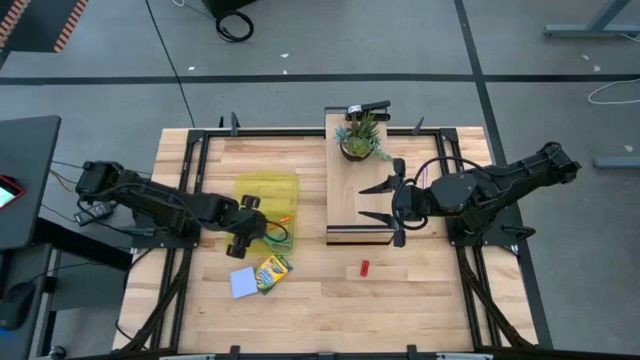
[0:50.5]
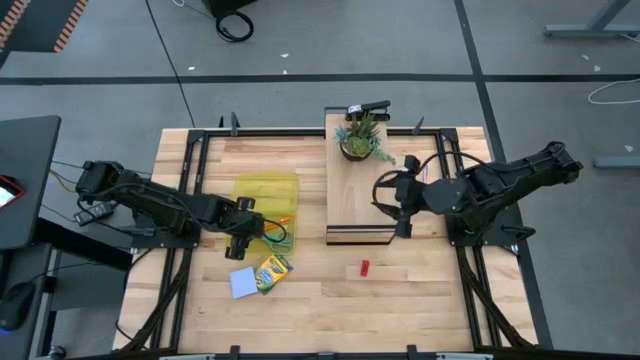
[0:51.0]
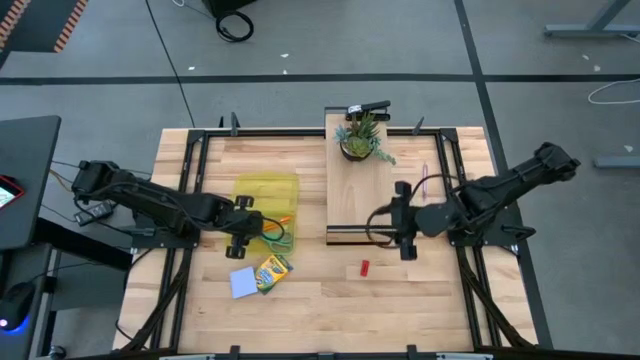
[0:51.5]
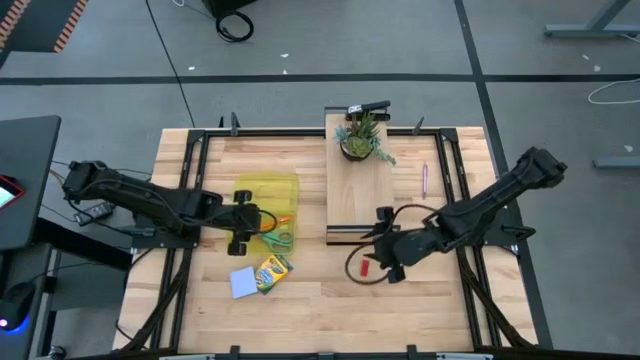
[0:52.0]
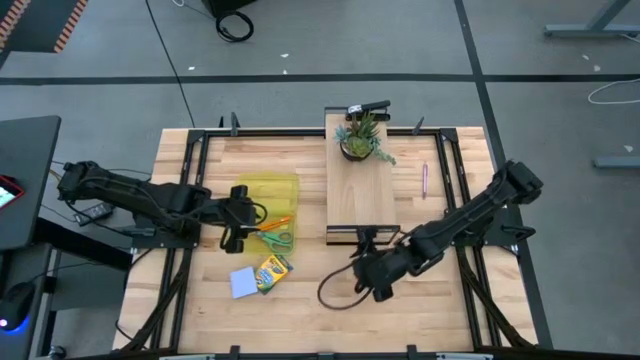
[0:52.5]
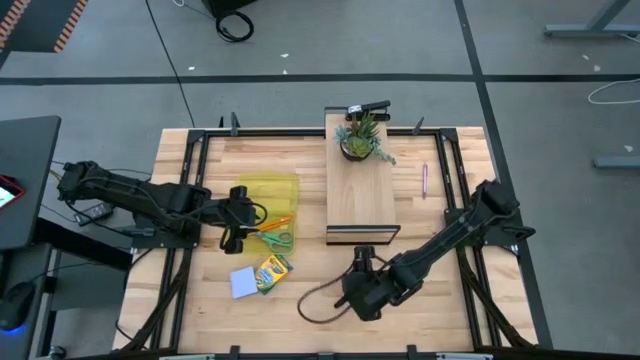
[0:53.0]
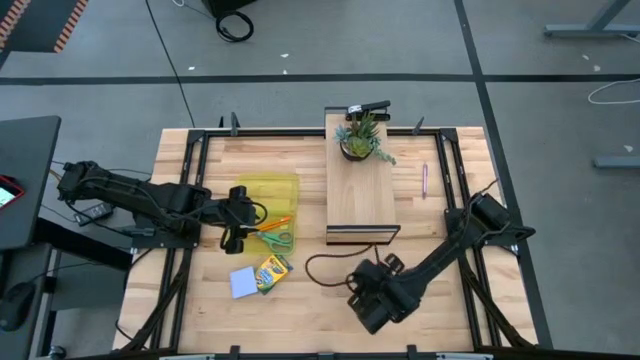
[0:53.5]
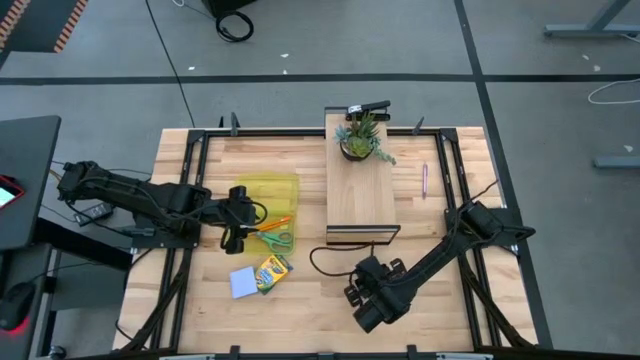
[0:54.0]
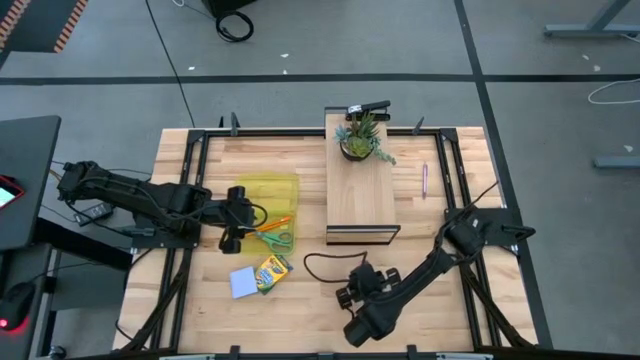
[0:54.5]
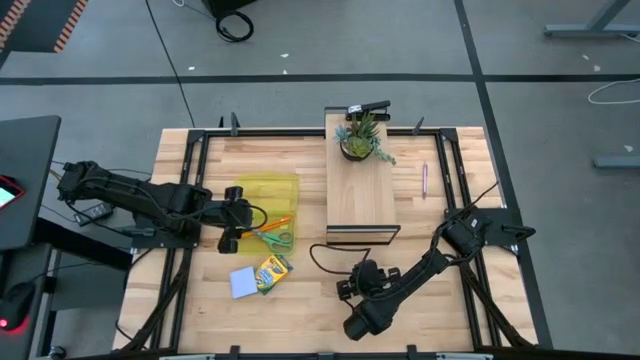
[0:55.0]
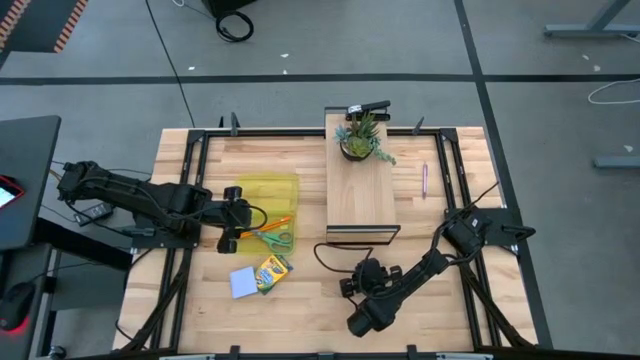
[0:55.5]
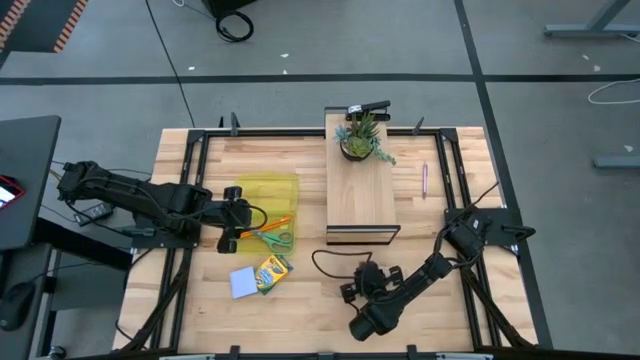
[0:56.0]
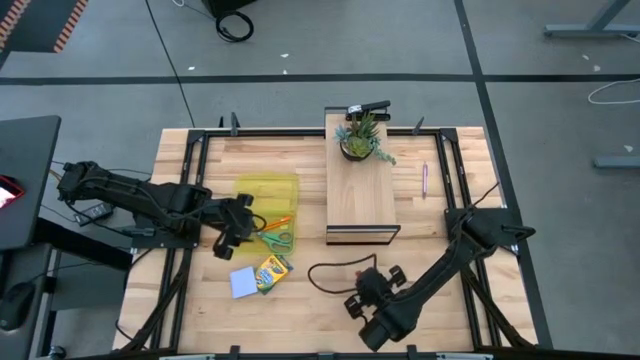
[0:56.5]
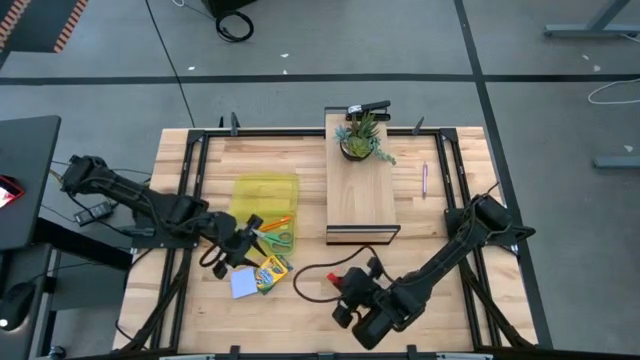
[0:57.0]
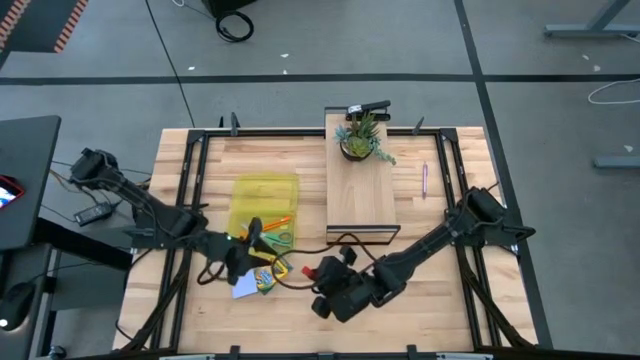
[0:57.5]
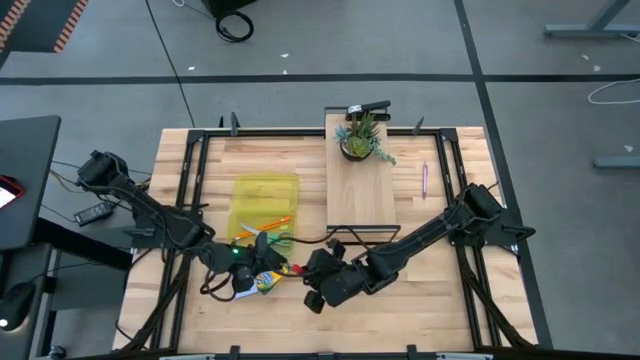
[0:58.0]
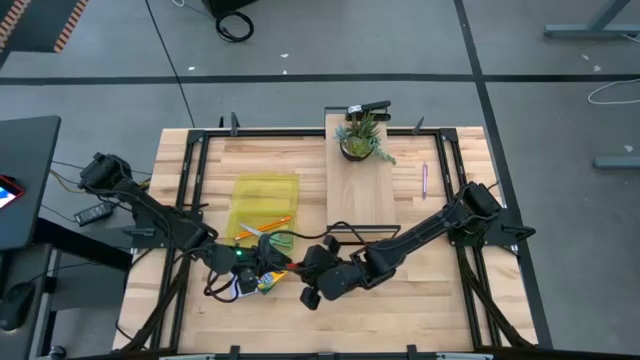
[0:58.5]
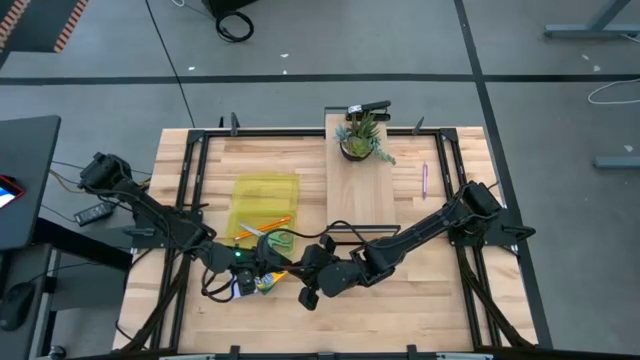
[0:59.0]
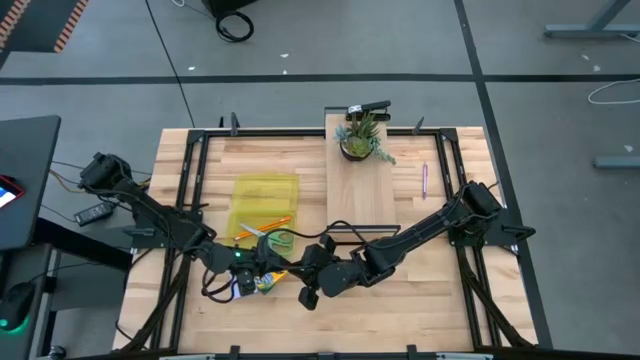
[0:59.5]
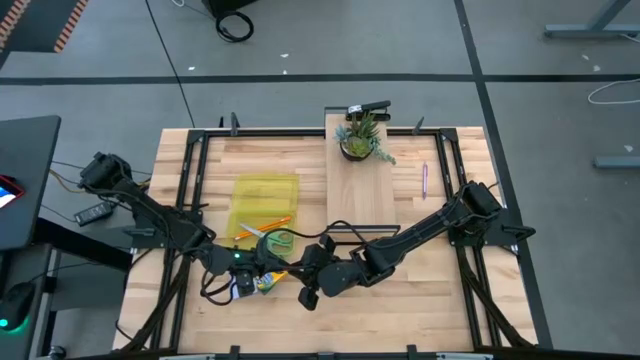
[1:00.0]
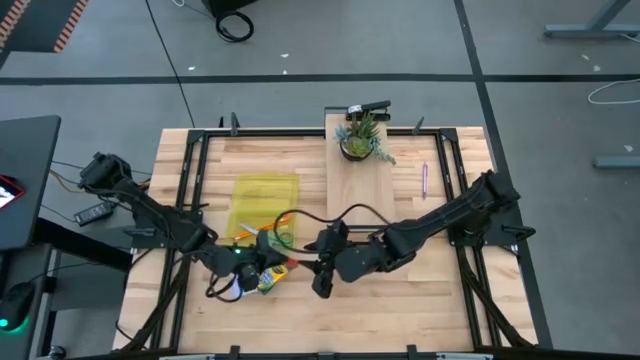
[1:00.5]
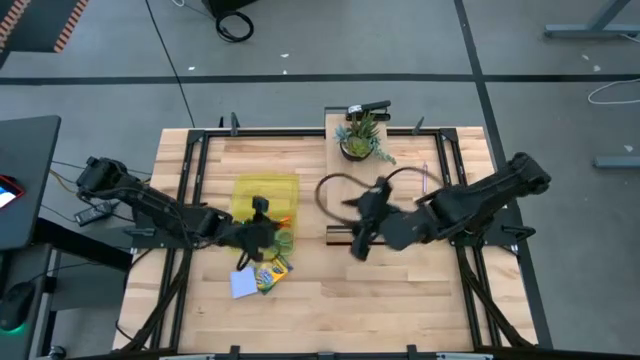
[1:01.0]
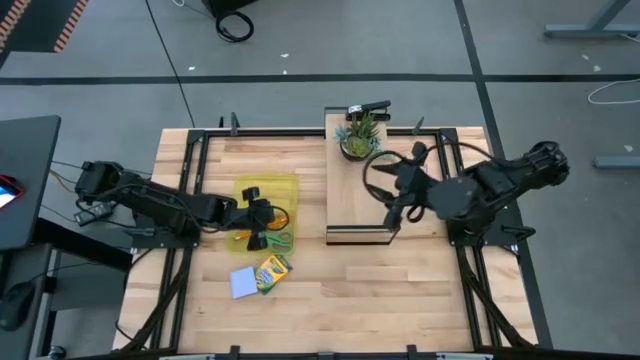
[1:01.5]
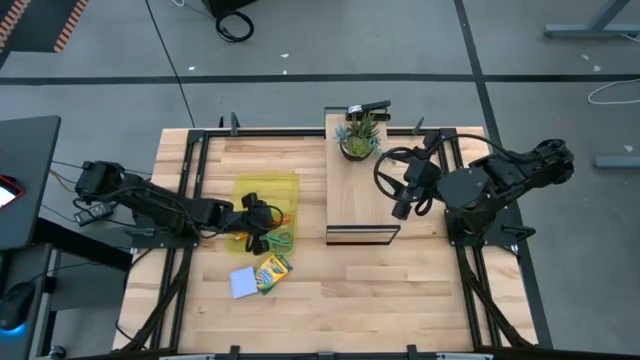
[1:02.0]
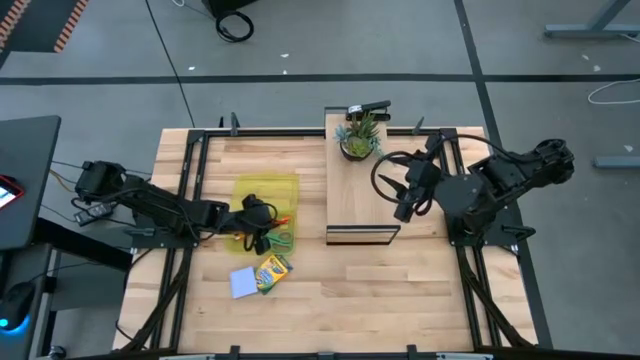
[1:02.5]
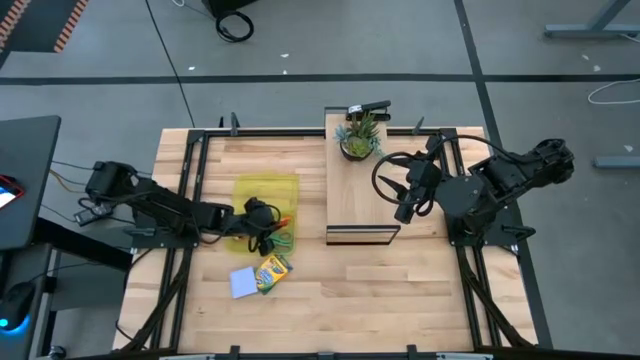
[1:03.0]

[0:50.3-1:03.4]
Task: Pack school essentials
Put the red eraser into the yellow supply box

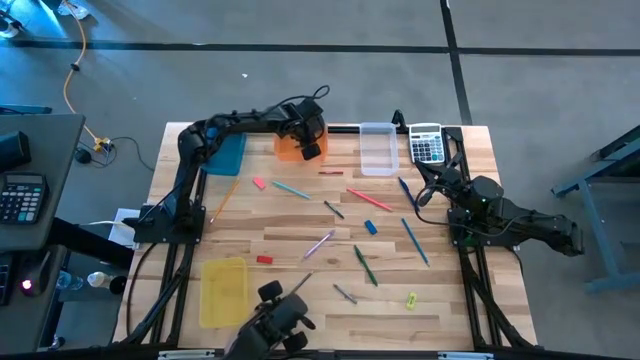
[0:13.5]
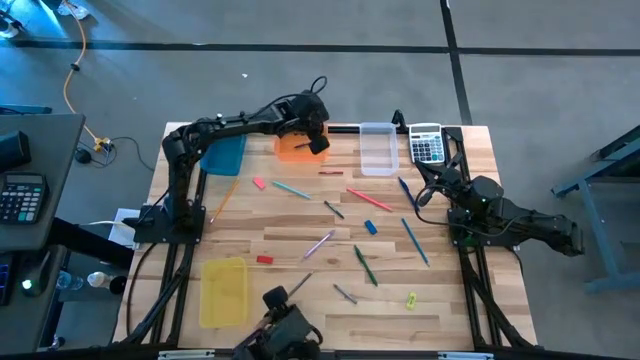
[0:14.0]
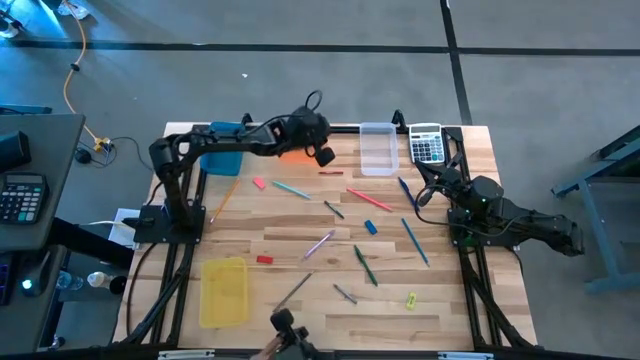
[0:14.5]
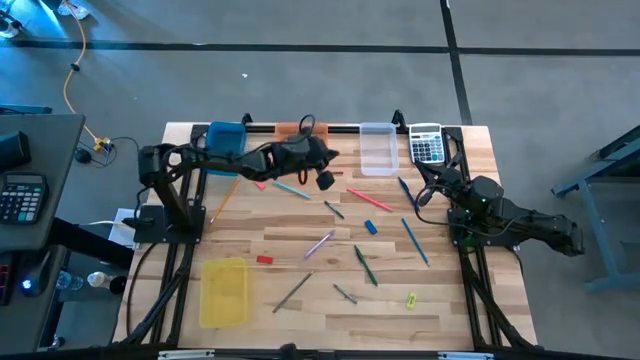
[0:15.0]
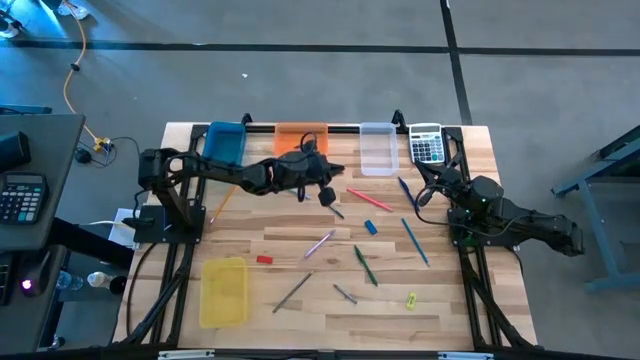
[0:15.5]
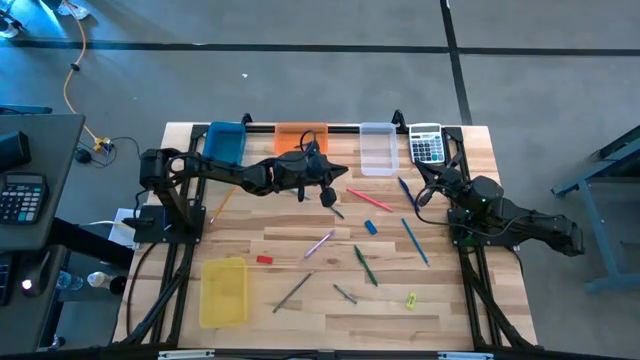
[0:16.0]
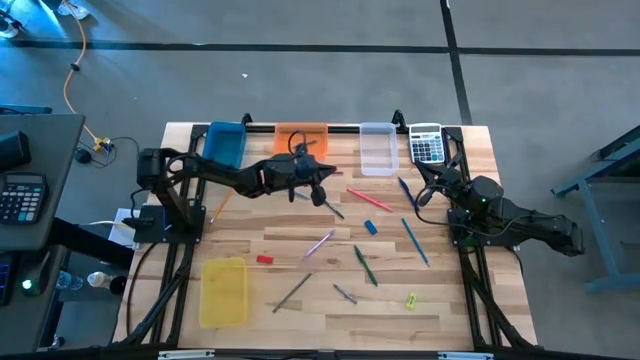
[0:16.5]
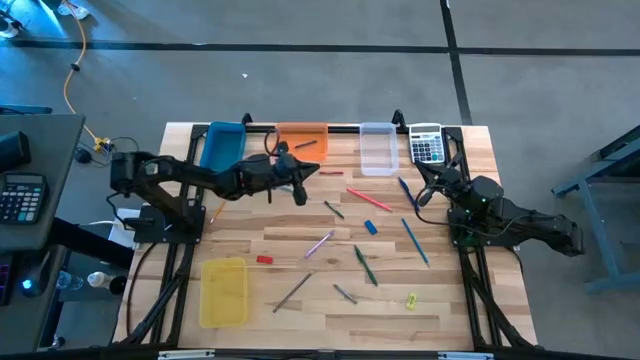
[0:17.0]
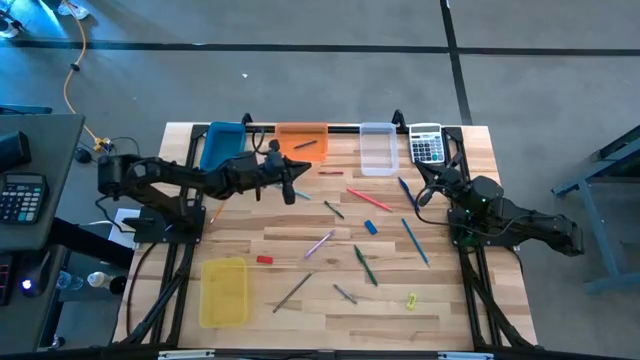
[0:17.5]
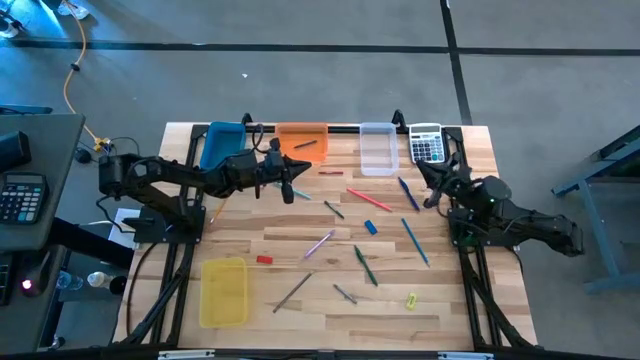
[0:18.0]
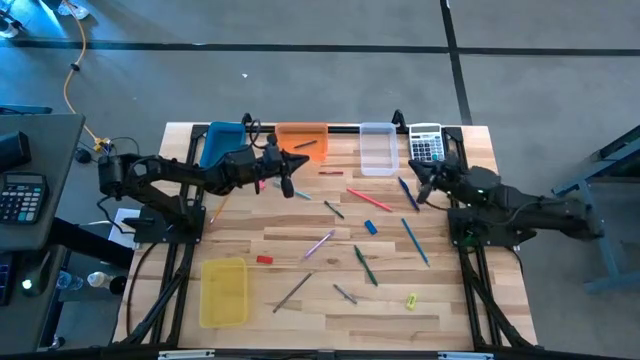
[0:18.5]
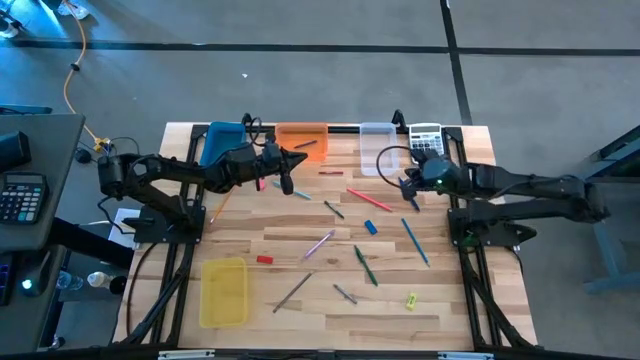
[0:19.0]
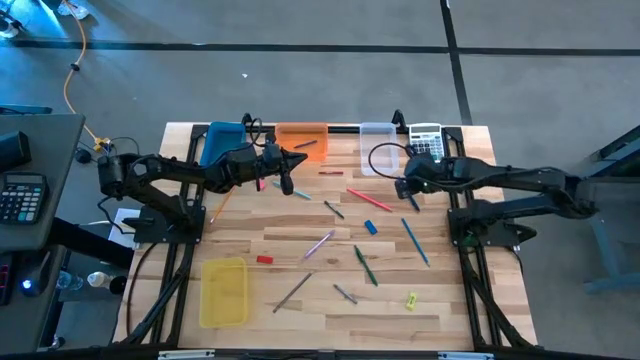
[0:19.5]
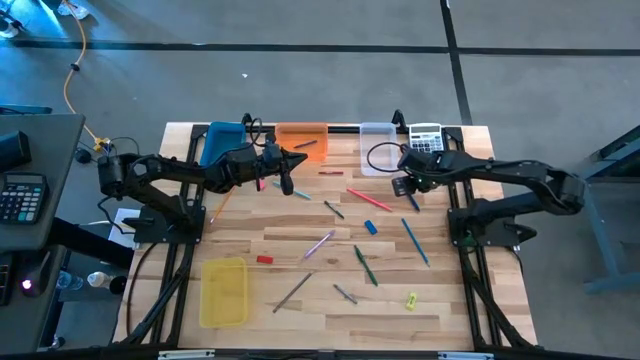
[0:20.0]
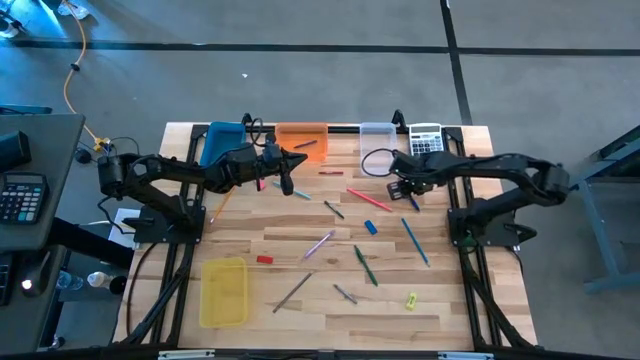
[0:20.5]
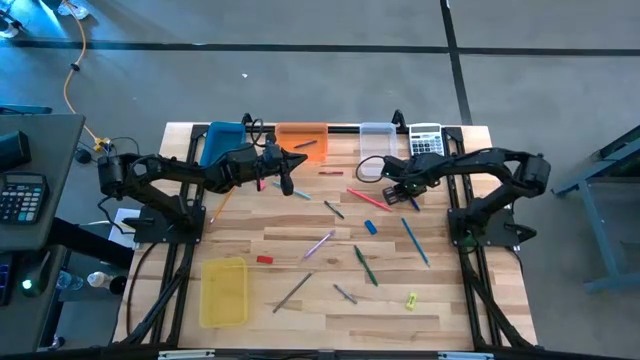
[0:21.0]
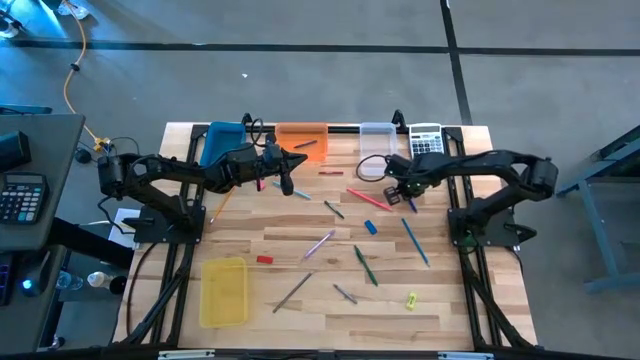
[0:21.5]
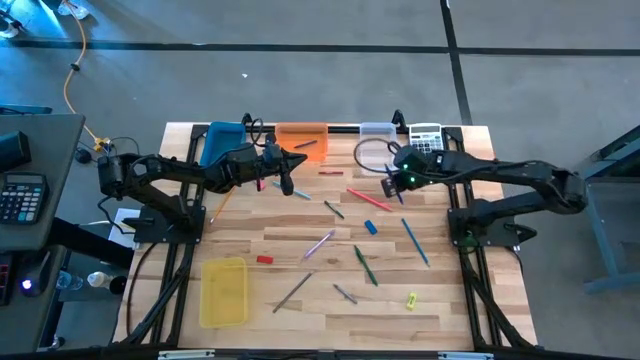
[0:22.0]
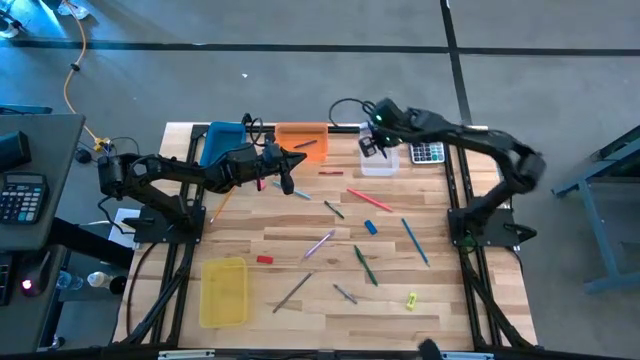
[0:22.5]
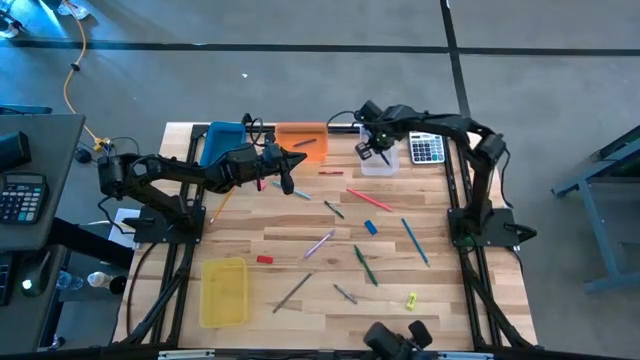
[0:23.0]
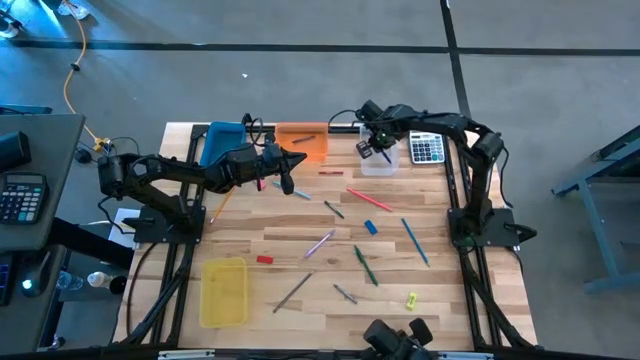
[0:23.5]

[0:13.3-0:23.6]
Task: Sort crayons/erasers/pens/pencils in bins
Put the blue pen into the transparent bin
